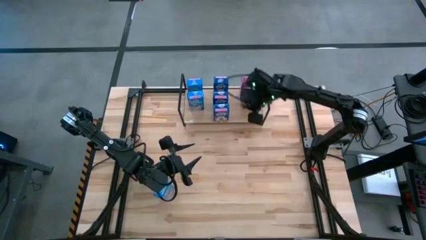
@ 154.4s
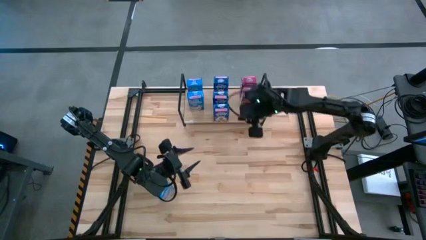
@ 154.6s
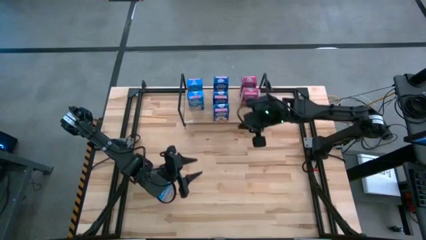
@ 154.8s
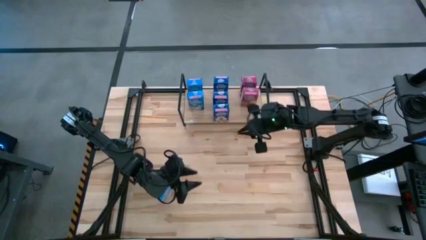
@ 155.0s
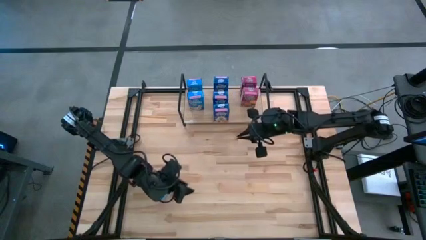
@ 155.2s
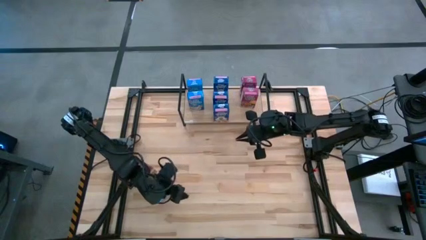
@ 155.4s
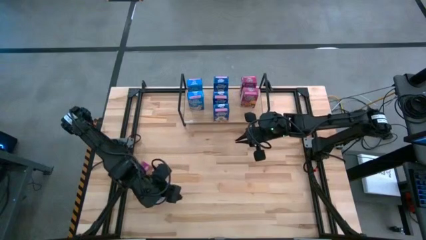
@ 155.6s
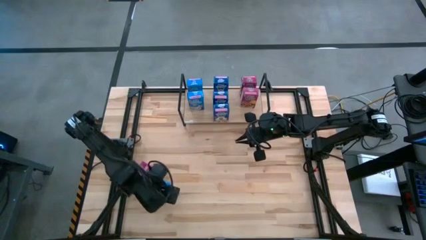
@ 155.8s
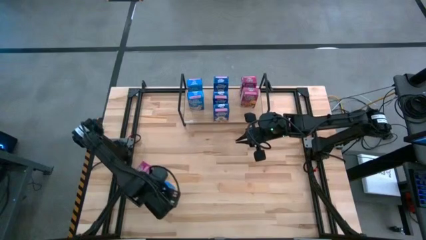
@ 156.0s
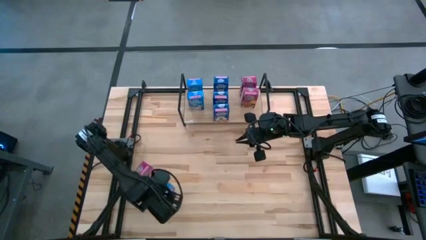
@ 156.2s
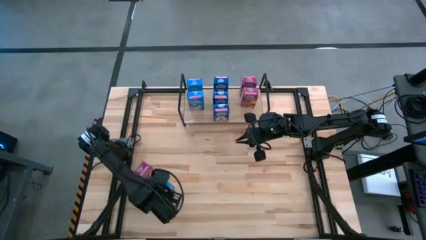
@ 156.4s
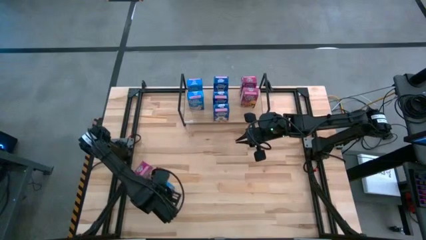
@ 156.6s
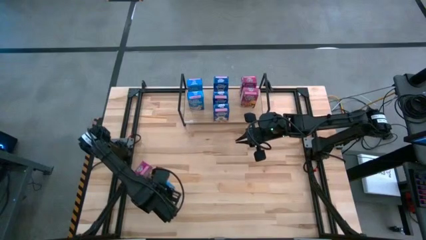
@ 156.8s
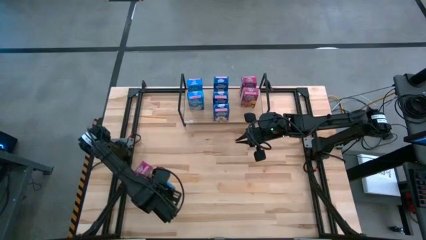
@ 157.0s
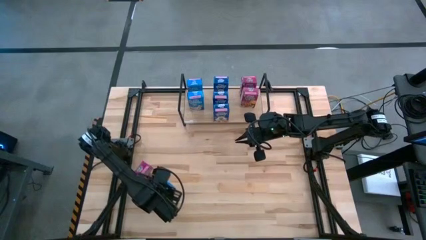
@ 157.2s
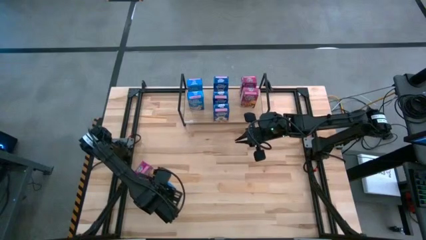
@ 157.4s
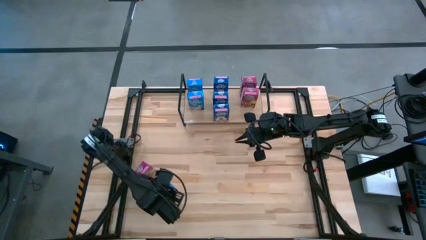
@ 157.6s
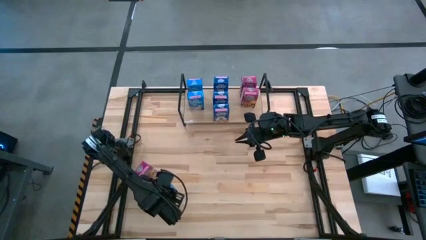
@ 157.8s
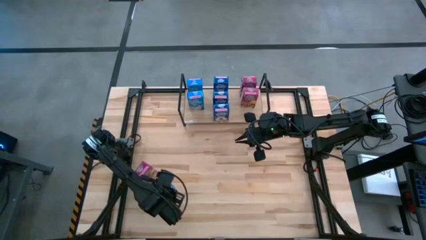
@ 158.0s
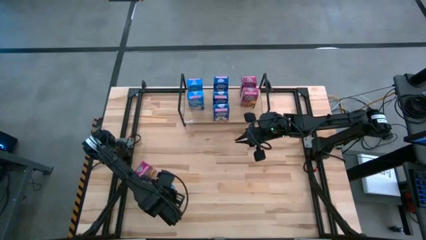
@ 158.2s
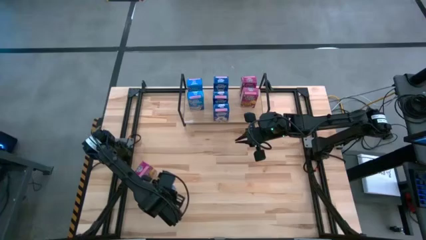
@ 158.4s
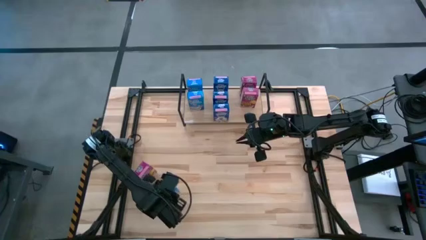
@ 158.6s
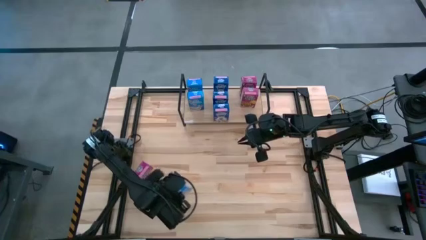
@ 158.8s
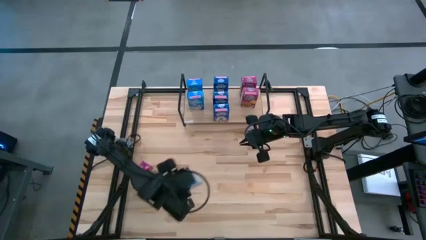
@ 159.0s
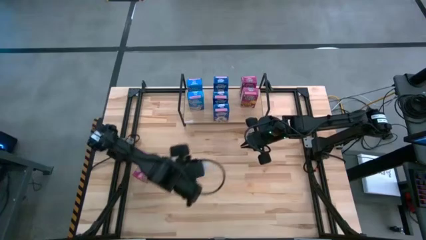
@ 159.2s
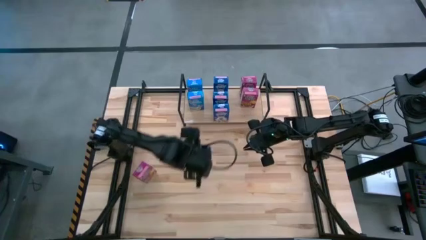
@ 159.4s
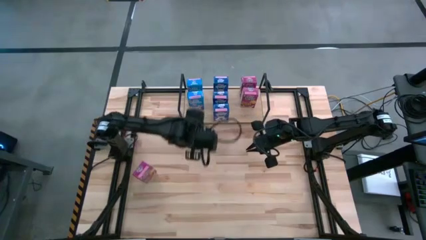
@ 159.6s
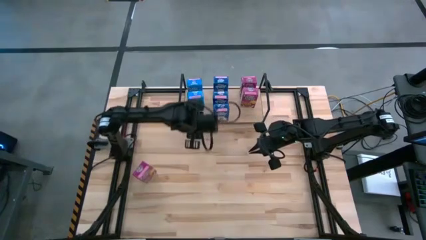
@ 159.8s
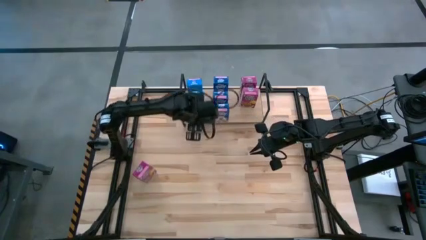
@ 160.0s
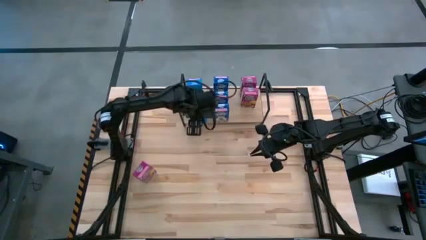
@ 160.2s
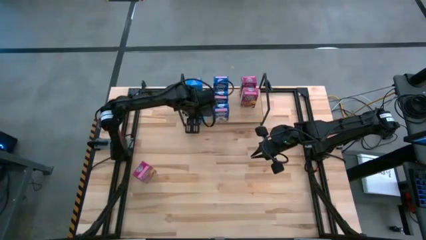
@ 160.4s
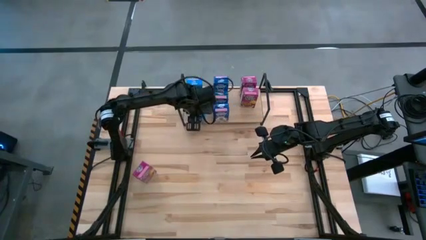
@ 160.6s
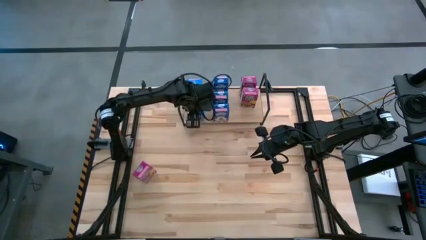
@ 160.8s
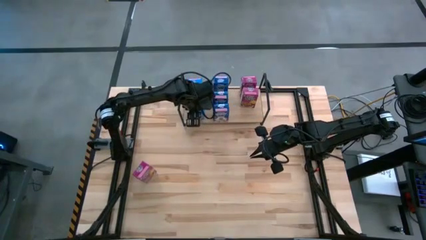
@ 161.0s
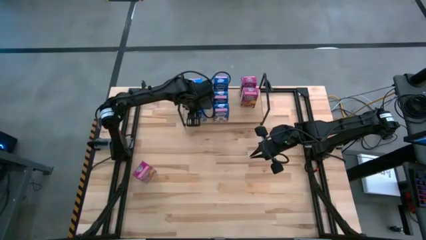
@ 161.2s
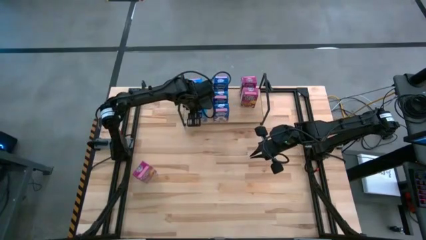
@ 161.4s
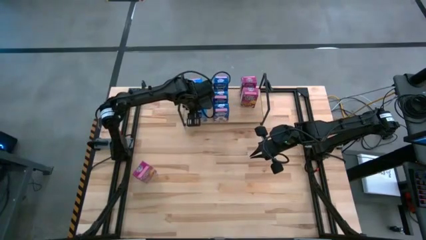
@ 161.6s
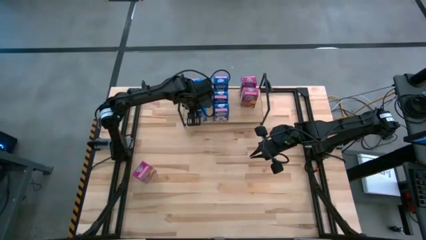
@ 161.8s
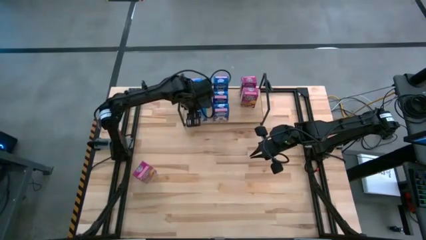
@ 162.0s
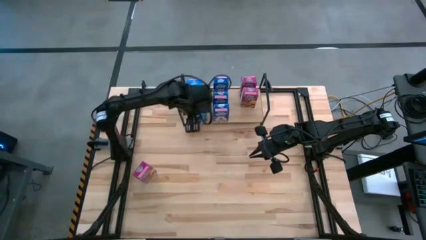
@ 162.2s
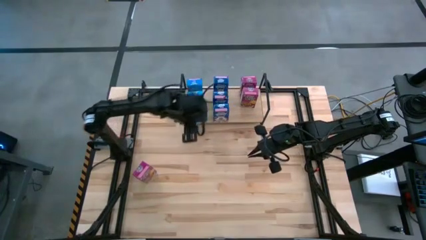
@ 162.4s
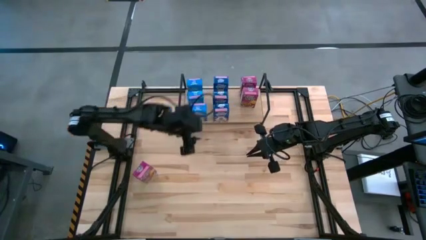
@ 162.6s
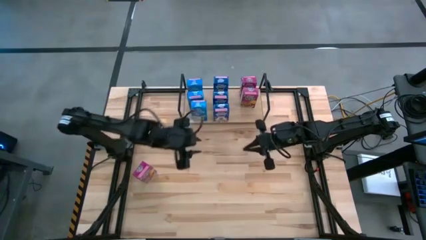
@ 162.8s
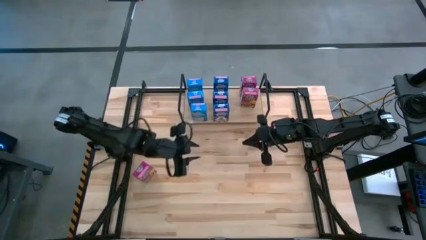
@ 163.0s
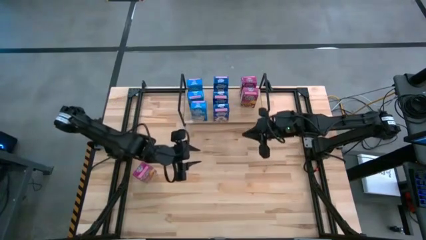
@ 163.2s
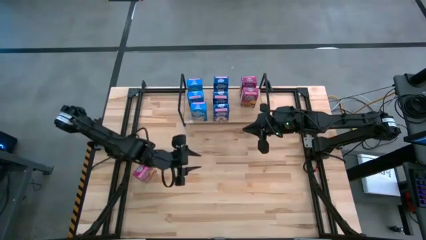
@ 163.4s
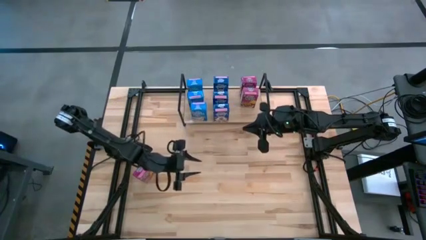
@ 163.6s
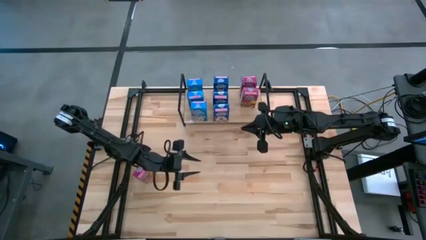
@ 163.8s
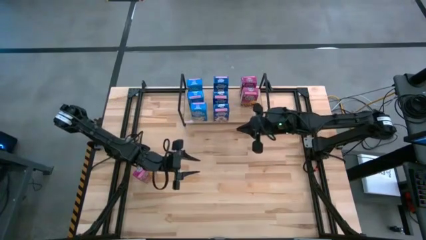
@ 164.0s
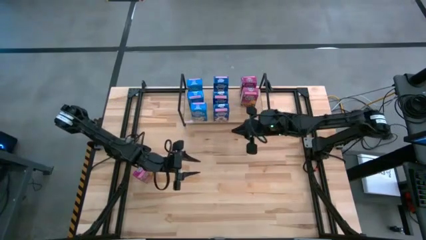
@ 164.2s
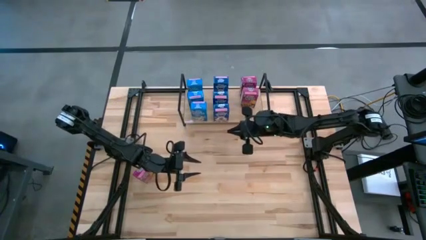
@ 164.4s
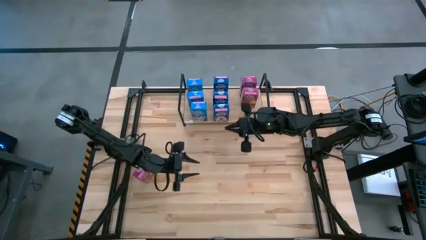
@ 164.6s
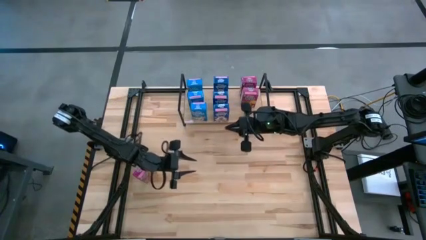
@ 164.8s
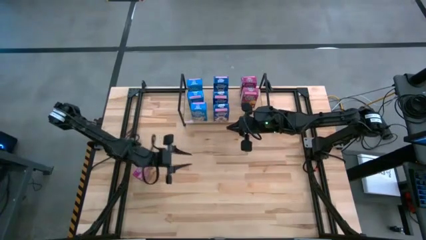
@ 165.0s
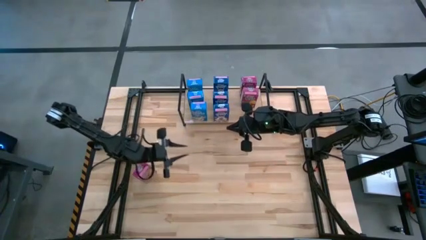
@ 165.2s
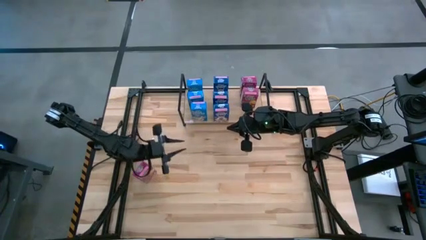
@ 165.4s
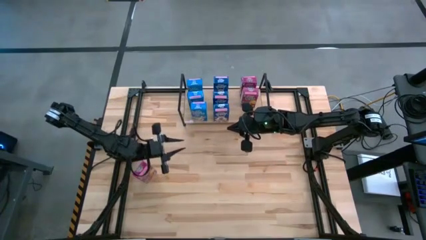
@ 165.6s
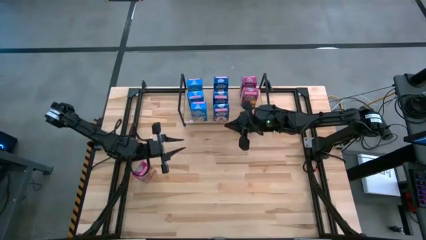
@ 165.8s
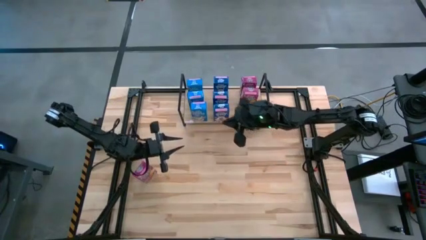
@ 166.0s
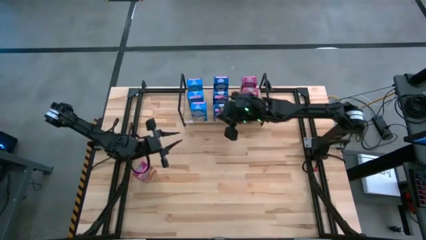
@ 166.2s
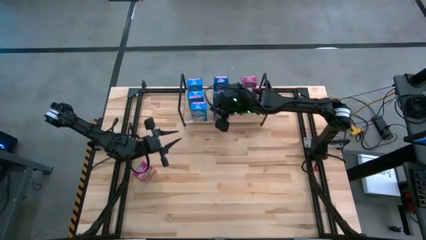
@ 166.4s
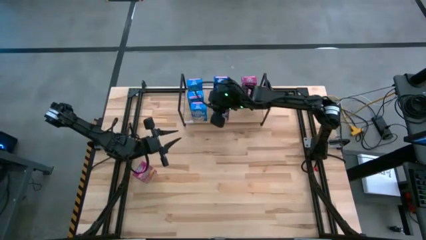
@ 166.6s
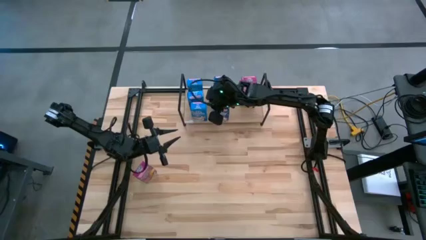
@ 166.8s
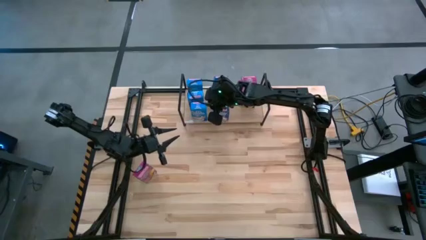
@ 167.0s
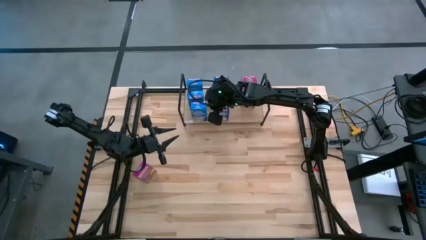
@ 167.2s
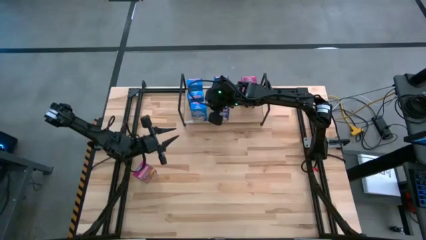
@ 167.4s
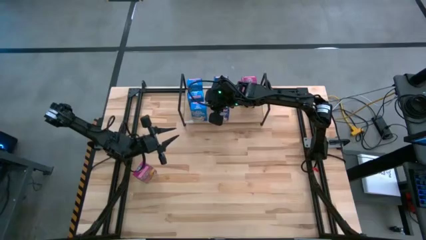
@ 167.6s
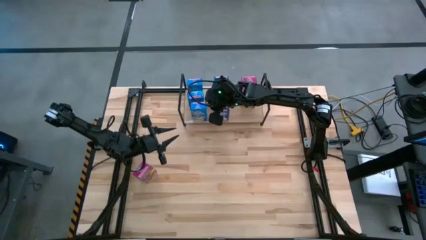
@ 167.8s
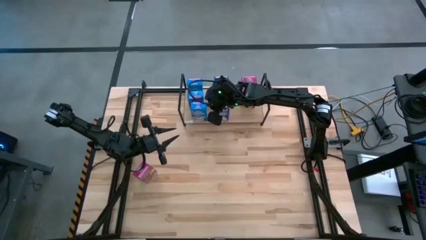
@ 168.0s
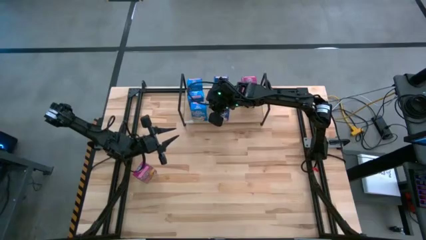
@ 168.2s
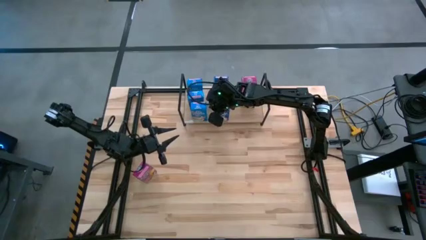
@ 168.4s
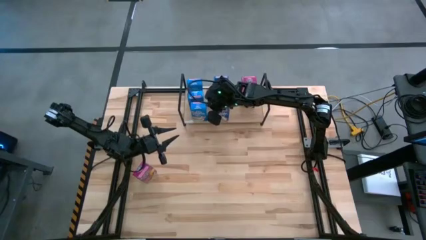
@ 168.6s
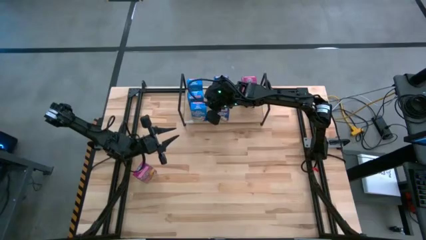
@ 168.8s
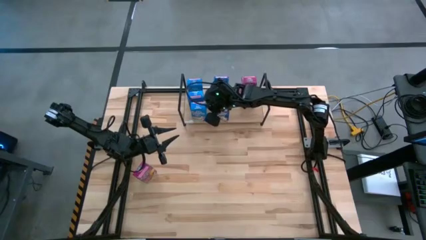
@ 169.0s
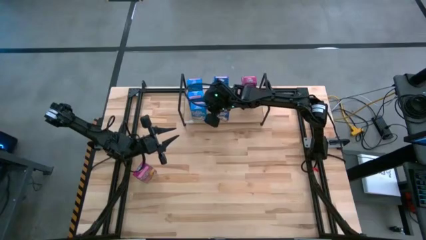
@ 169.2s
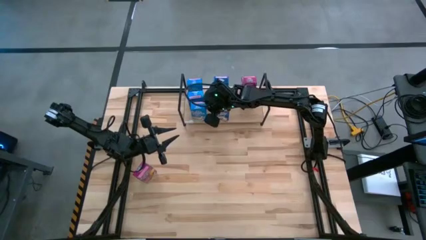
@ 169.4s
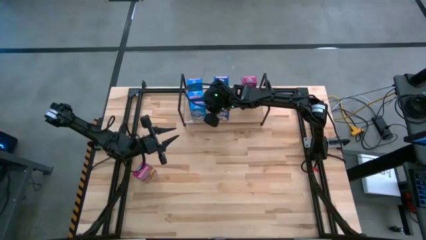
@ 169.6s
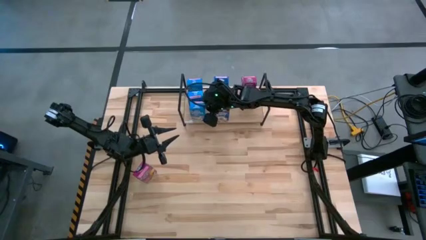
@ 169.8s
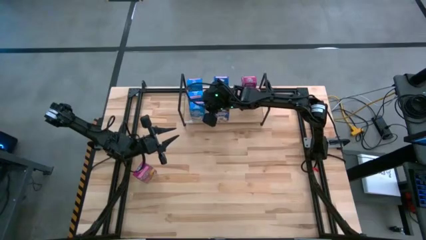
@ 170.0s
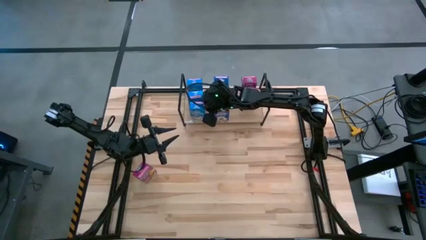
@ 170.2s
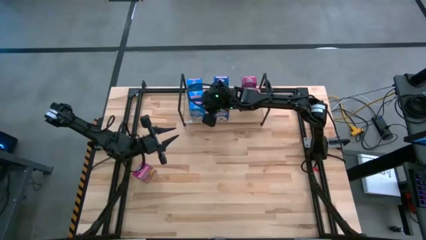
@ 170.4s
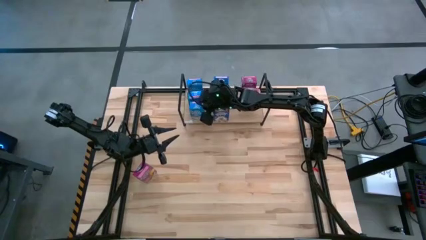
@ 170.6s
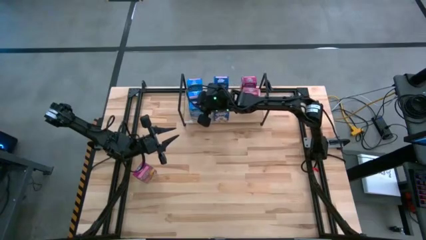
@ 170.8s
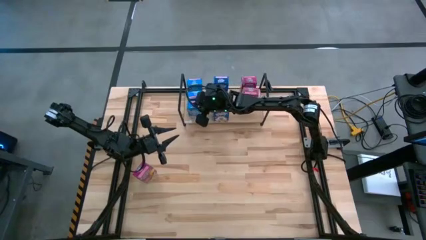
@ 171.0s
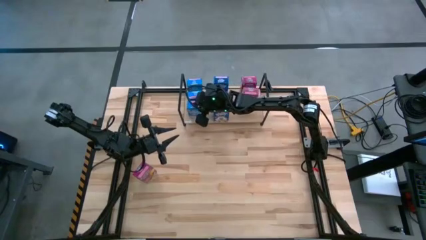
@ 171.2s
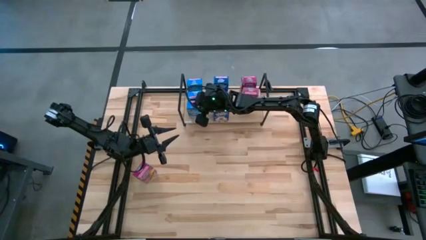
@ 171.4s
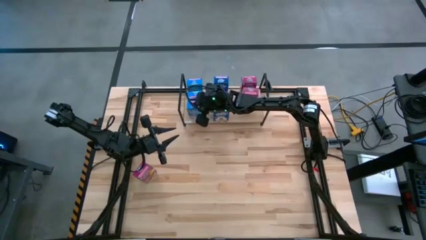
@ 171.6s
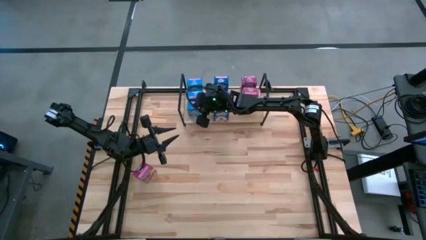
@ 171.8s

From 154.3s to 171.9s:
Task: Stack cereal on shelf
Put the blue cereal box on the shelf aligned with the other blue cereal box
